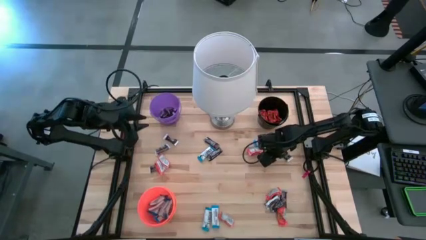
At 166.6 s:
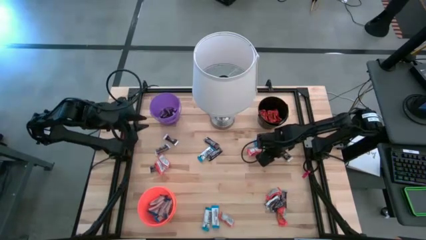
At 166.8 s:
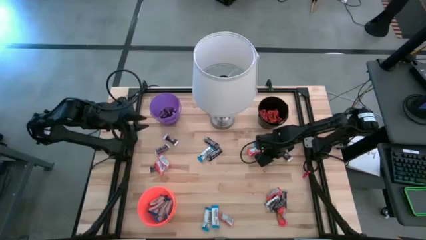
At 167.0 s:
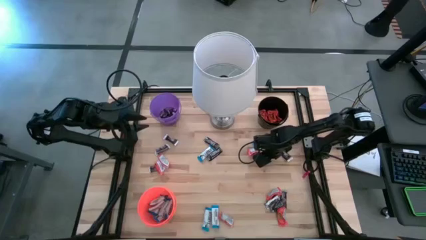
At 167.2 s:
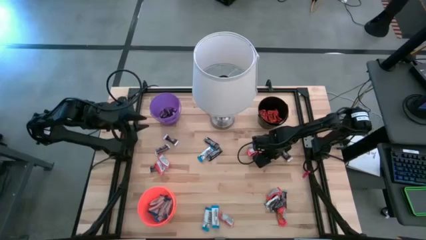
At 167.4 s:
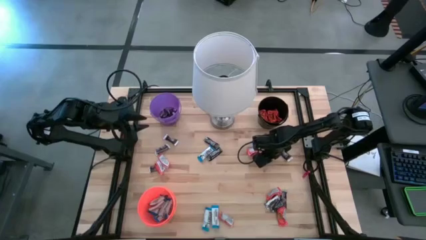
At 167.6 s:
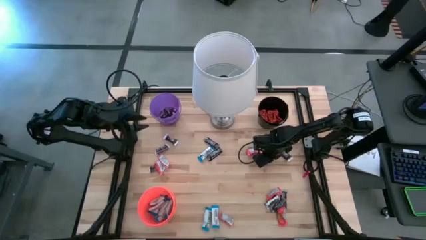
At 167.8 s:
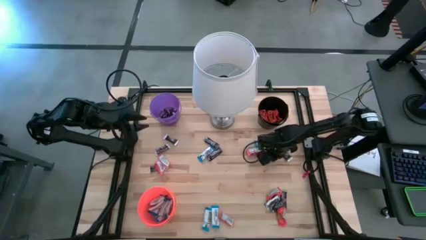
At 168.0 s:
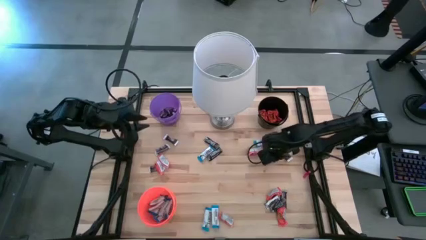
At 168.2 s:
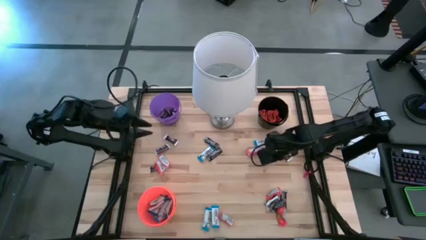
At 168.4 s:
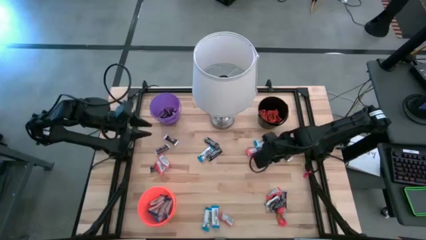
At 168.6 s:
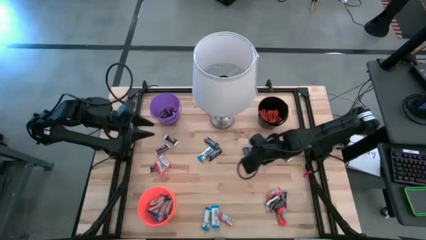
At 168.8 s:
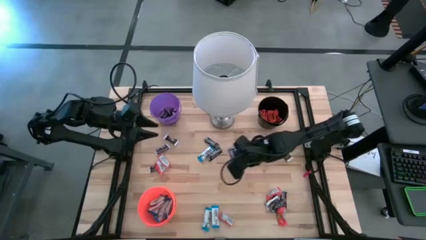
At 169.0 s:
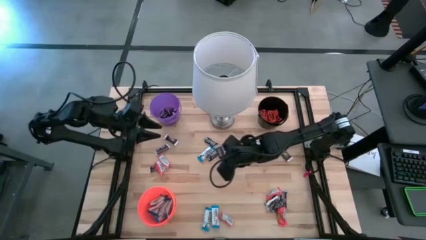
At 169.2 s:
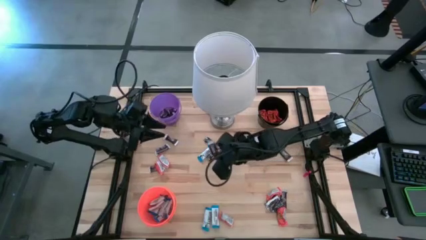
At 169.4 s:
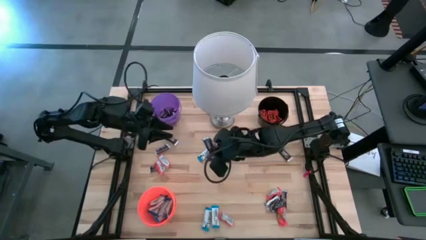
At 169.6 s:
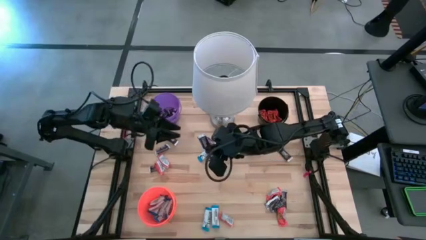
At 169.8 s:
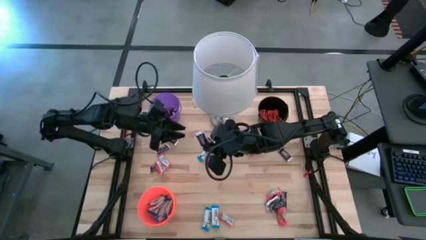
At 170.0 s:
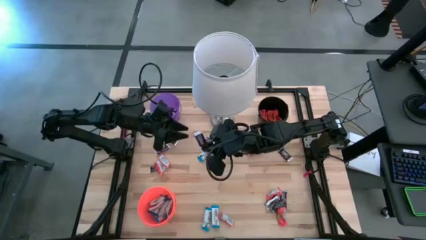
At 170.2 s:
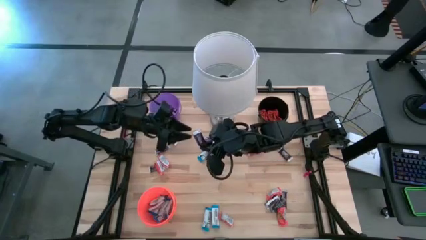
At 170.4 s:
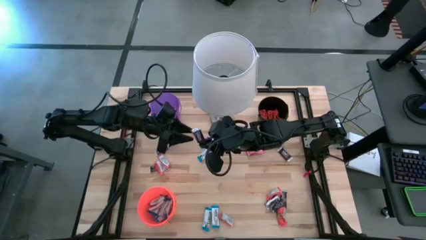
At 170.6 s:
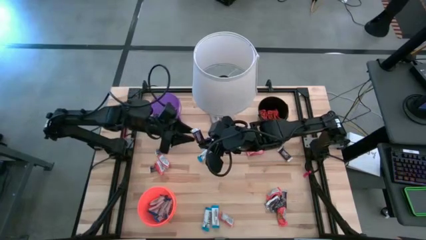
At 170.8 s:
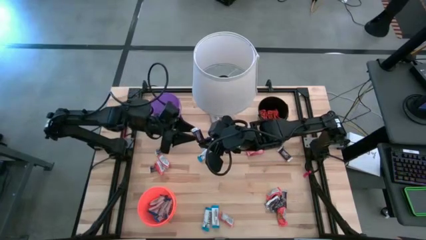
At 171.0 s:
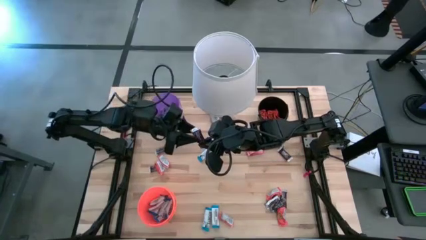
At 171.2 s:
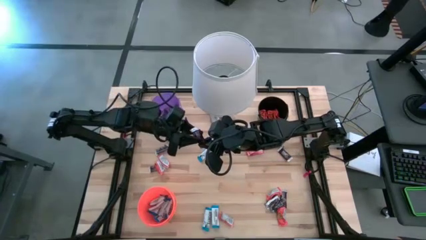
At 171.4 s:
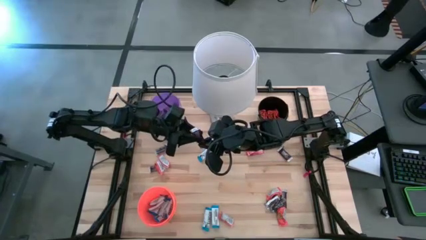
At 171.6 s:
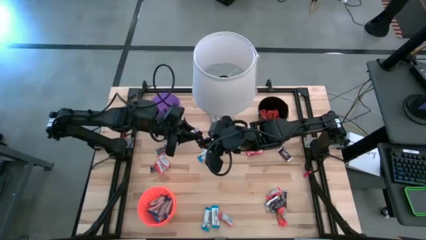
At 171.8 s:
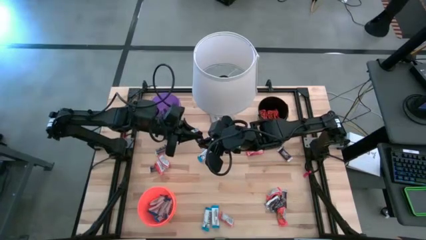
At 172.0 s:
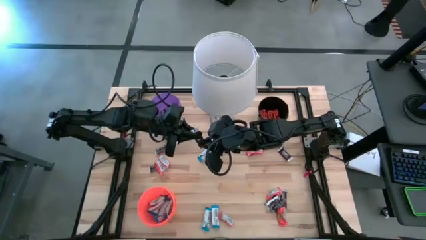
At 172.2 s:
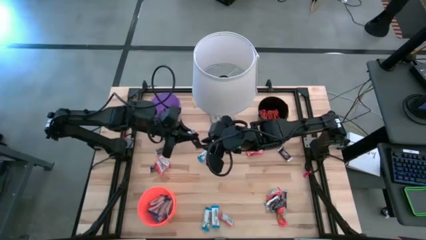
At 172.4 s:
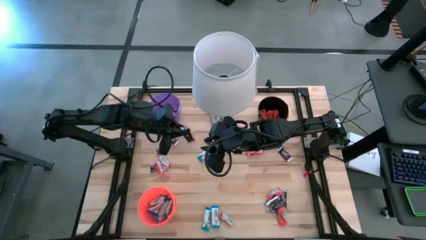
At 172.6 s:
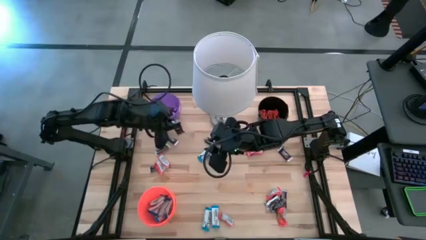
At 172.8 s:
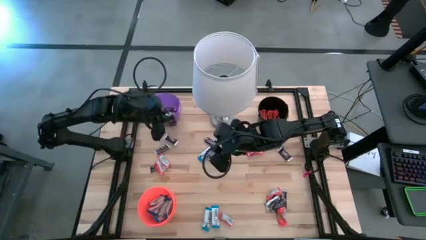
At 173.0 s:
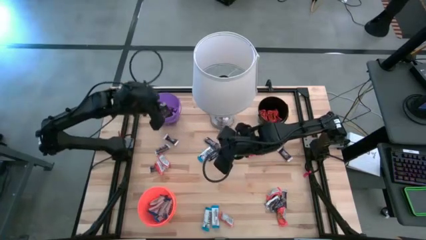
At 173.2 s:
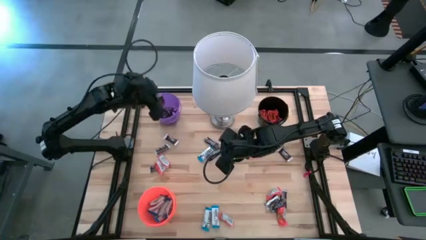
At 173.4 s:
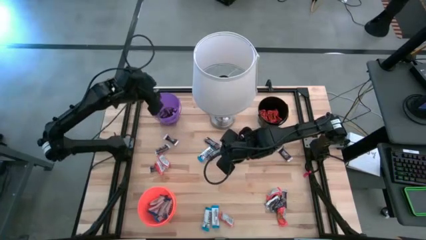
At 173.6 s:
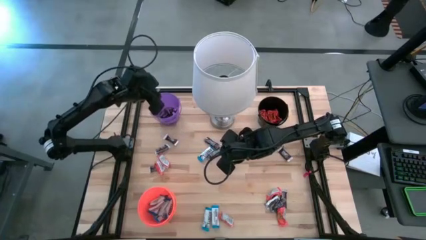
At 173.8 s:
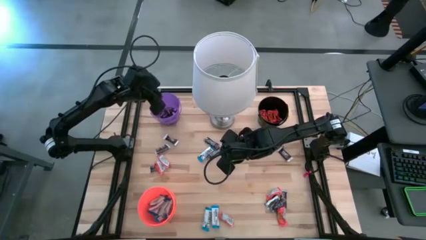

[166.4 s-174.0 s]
Task: Organize candy in baskets
Put the brown chocolate bar into the purple bucket

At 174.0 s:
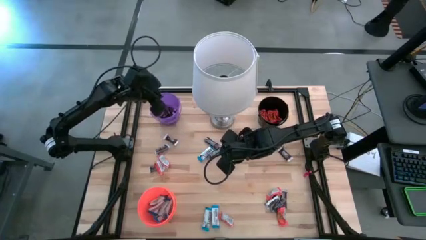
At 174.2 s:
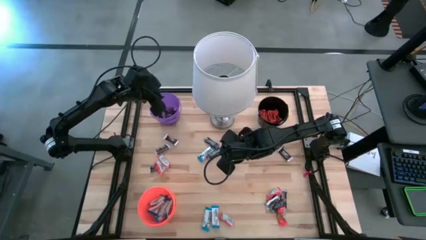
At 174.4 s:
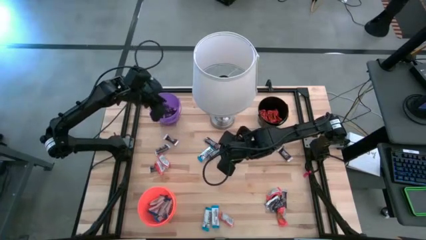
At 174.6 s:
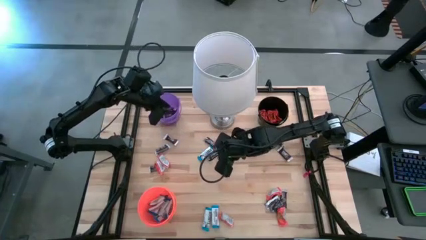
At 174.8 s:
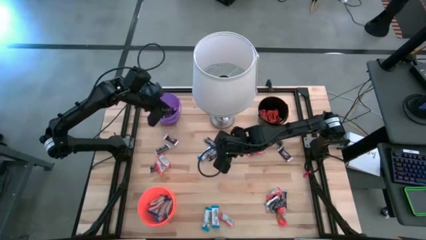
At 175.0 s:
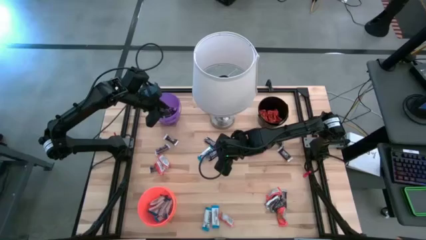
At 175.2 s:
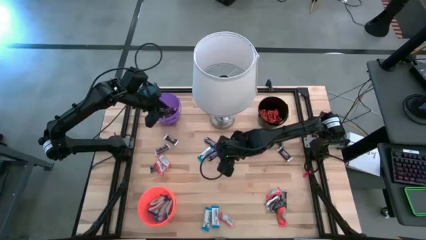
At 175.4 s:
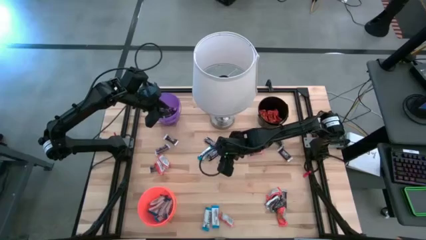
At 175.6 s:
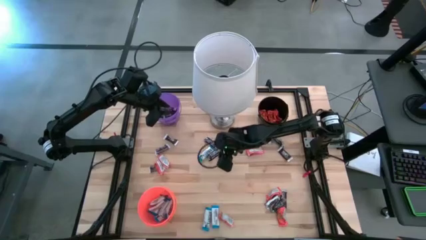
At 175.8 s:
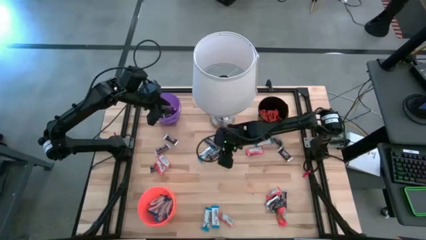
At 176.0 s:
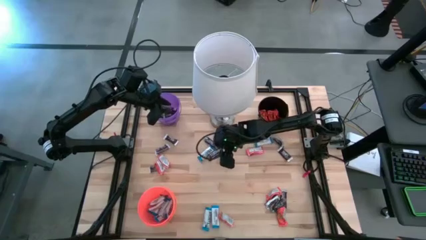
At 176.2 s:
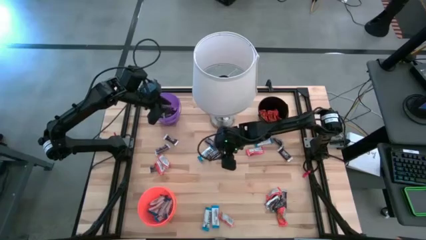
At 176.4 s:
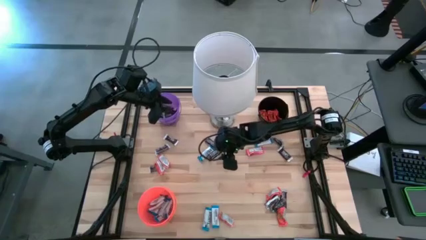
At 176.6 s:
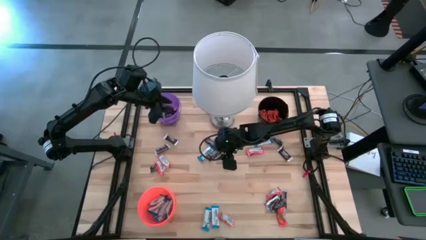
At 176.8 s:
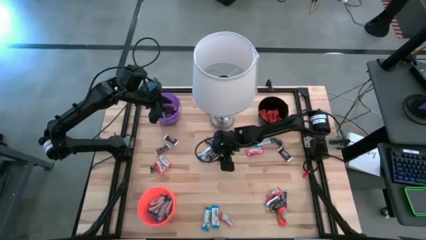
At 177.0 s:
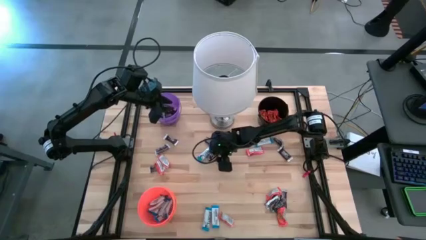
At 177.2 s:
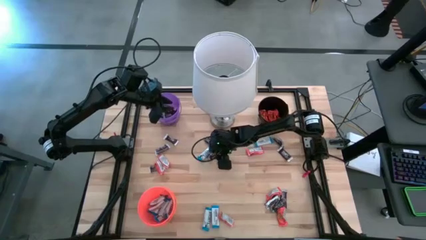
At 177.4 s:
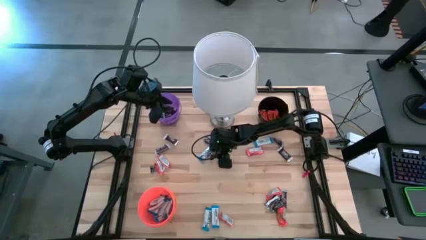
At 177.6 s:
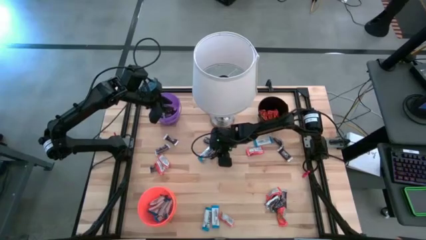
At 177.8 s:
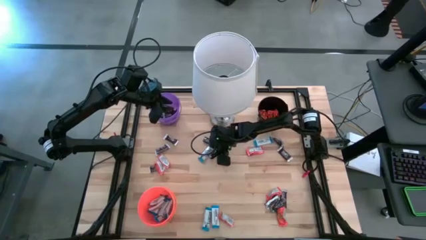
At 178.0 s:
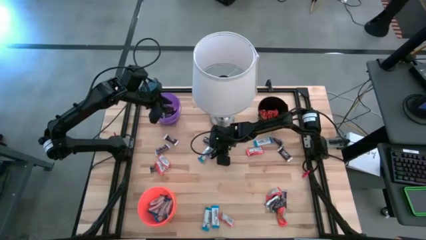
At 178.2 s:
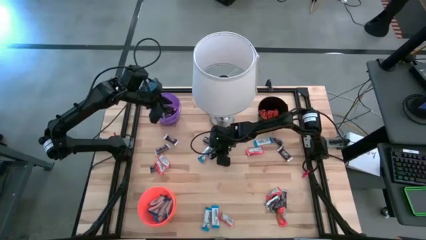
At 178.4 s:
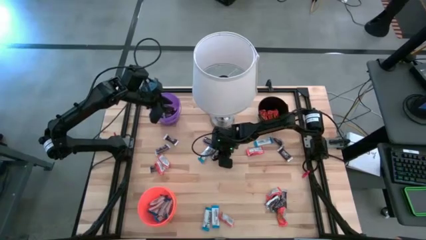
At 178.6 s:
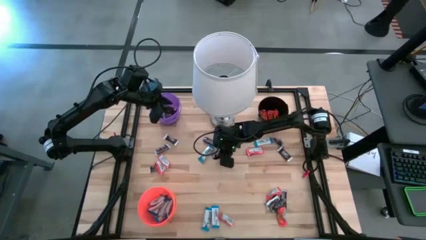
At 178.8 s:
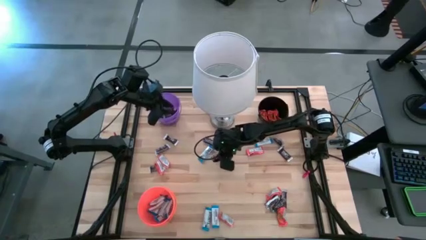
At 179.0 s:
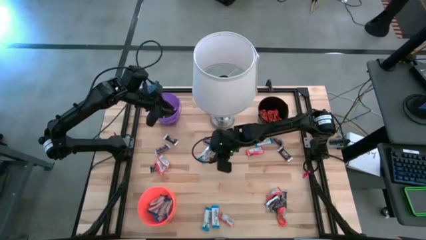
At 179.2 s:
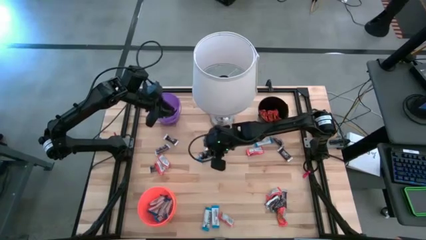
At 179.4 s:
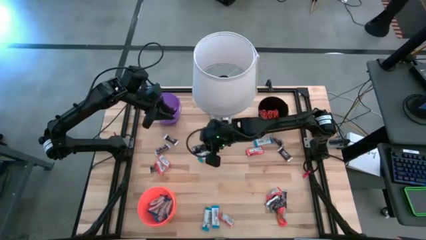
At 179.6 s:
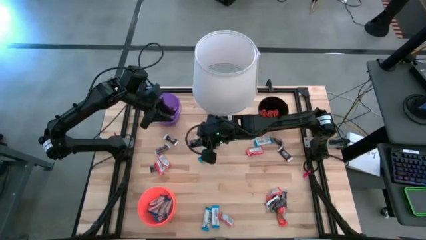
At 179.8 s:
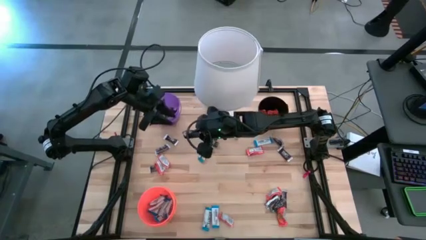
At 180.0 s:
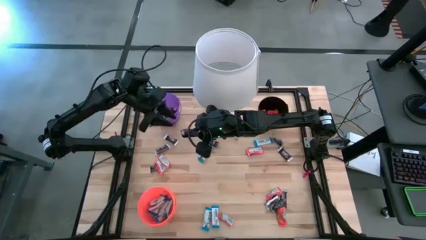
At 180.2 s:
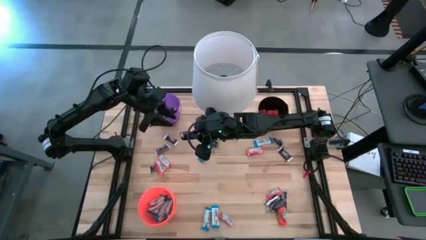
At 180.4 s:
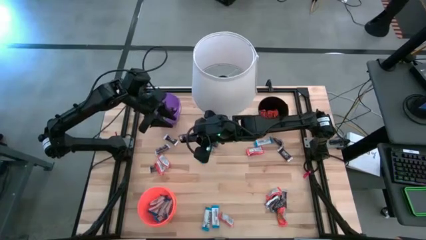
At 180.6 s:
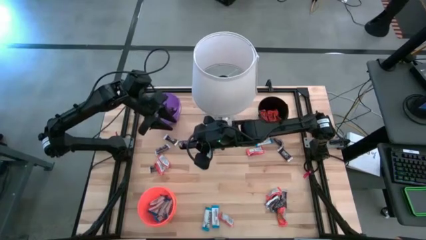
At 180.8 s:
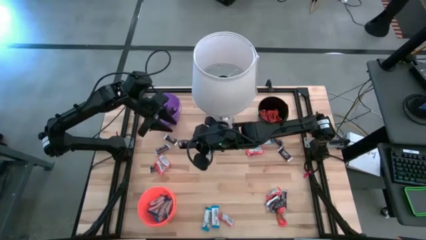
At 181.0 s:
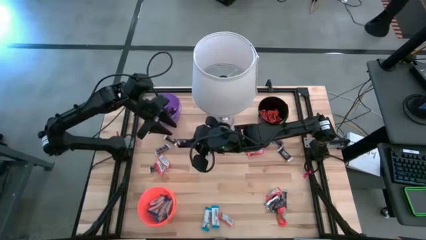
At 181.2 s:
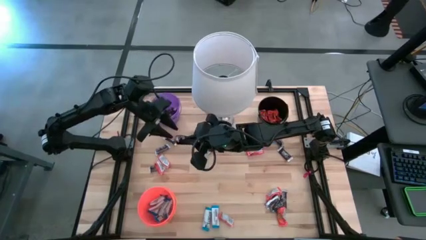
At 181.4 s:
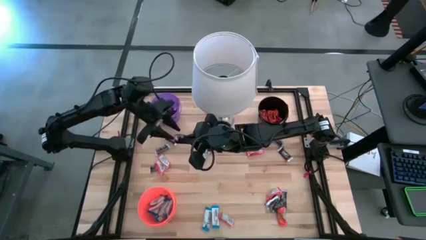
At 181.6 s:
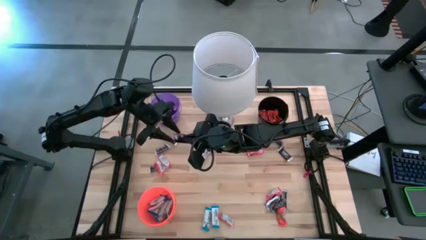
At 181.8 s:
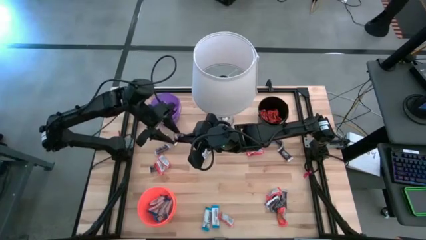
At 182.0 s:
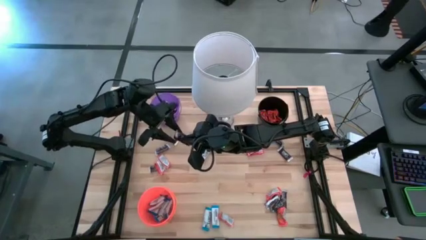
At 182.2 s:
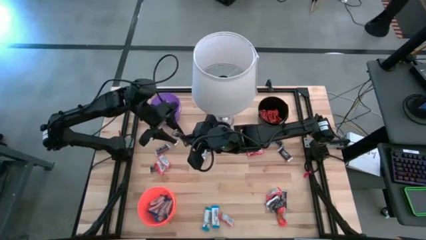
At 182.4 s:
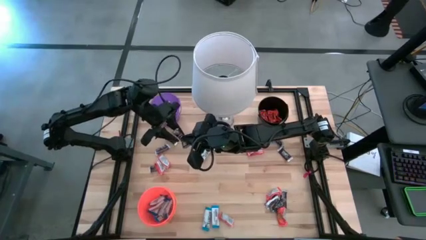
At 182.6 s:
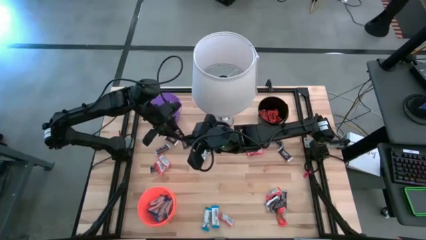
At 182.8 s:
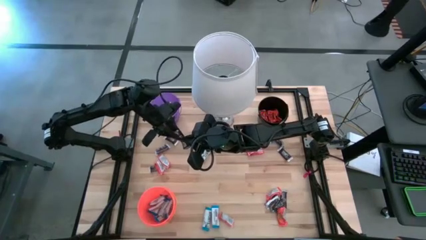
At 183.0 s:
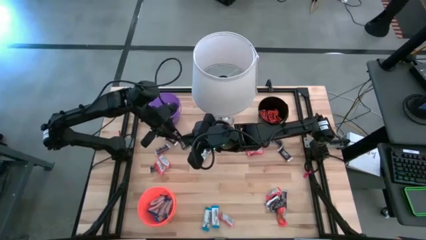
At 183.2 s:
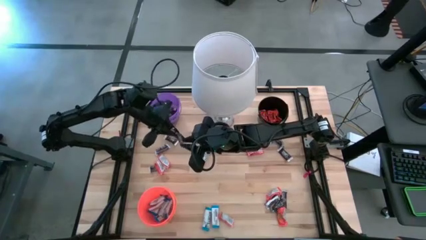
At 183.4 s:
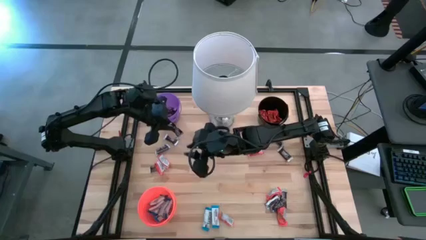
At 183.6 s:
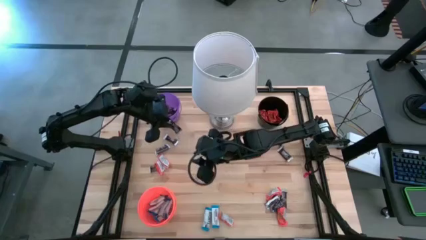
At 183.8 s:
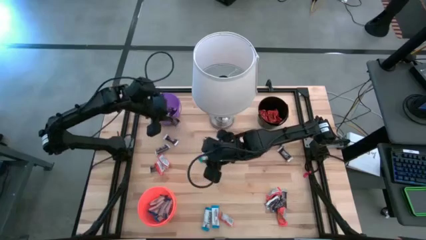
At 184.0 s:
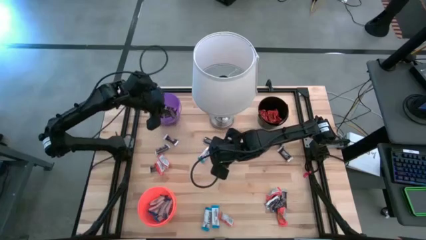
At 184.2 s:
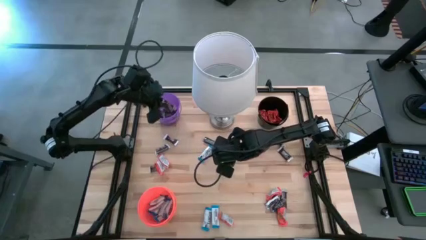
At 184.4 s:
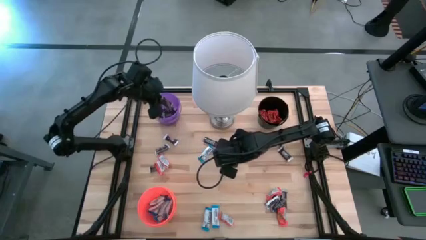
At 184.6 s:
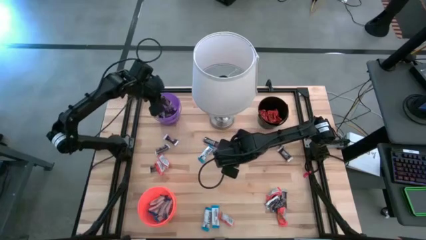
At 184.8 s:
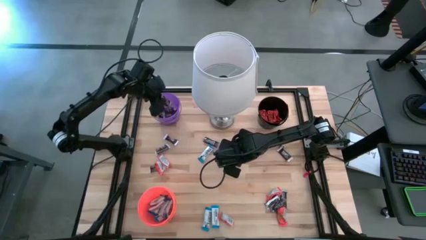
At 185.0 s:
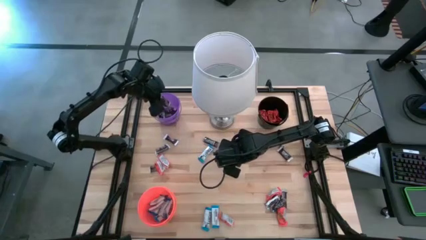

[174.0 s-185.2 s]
Put the brown chocolate bar into the purple bucket
